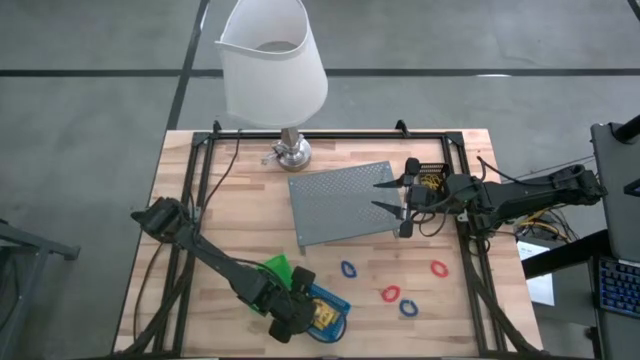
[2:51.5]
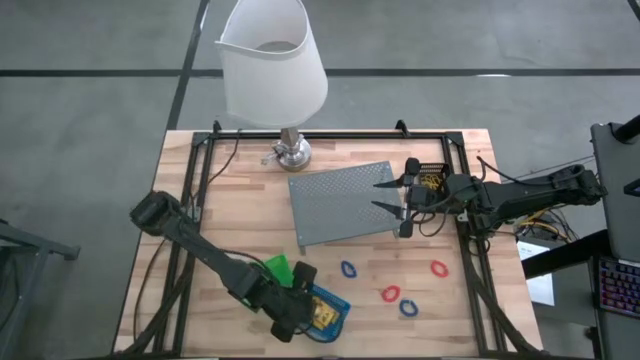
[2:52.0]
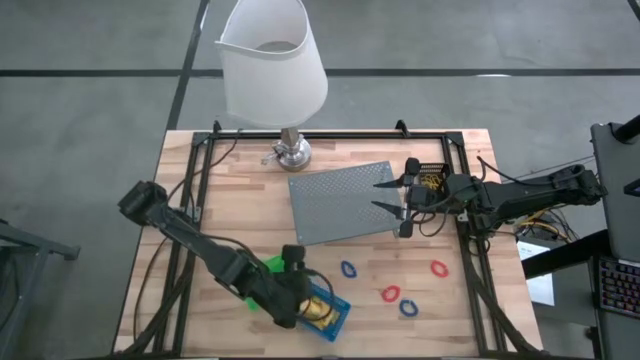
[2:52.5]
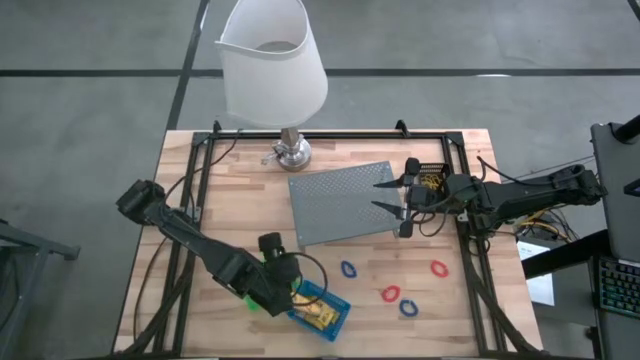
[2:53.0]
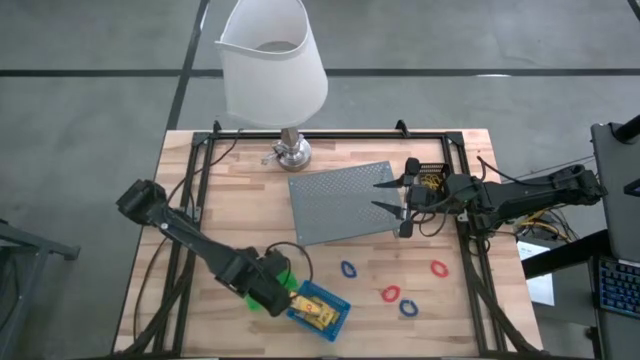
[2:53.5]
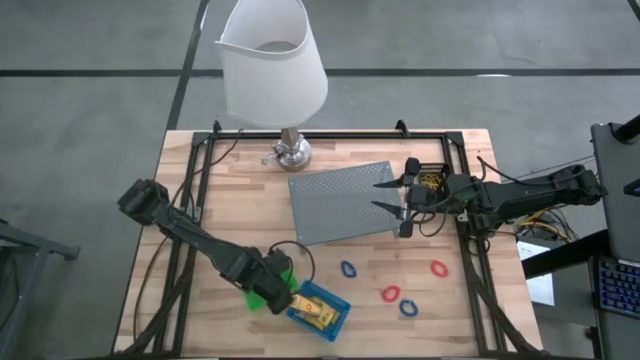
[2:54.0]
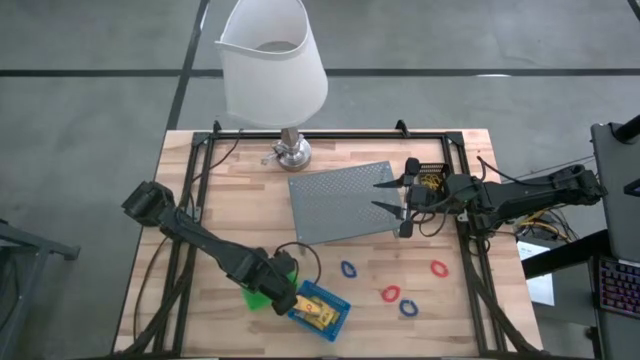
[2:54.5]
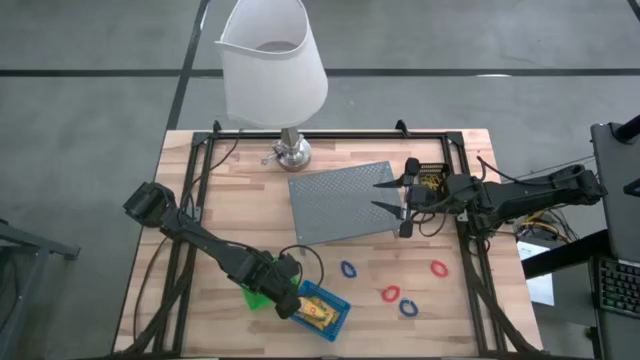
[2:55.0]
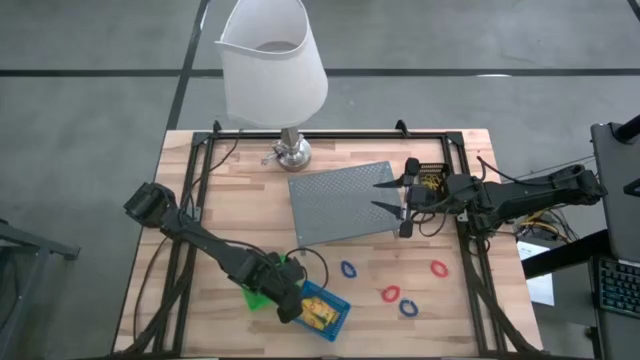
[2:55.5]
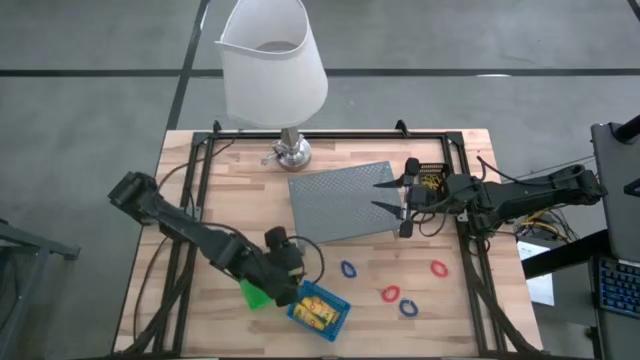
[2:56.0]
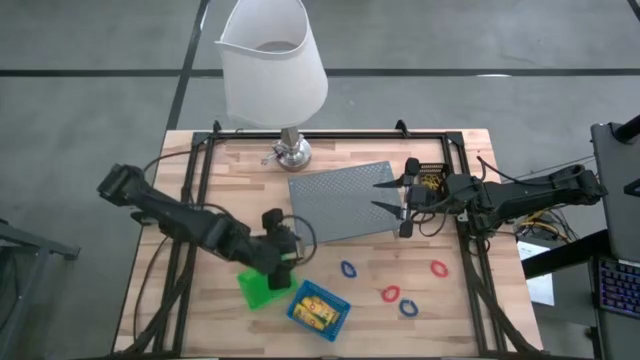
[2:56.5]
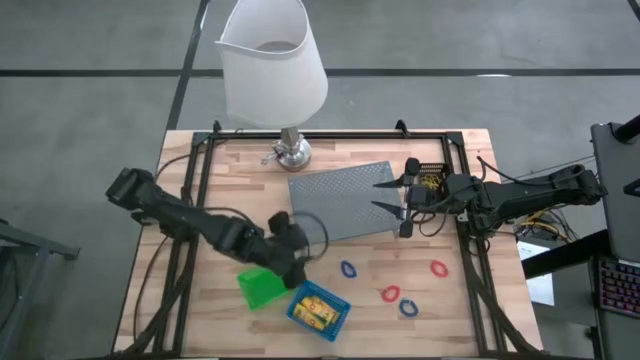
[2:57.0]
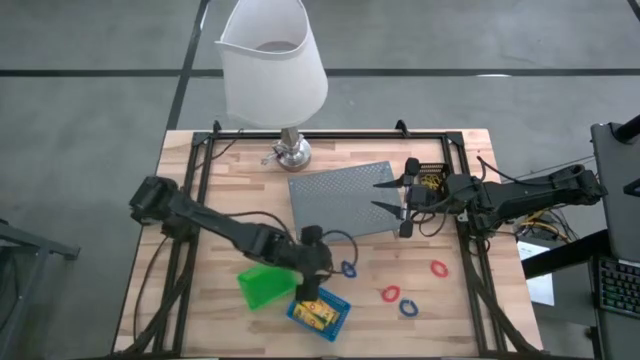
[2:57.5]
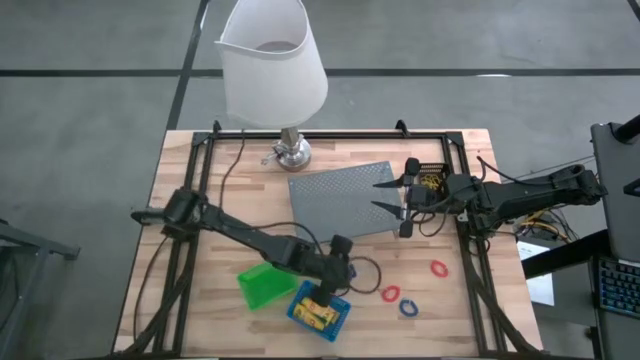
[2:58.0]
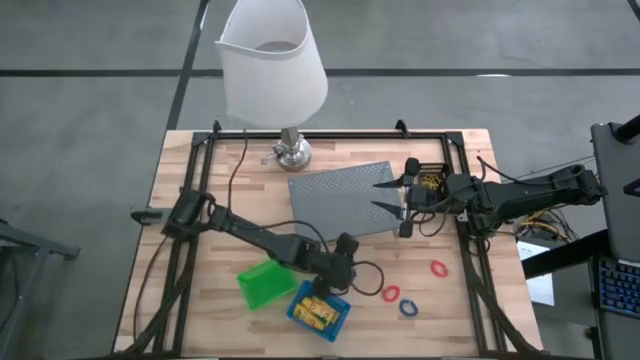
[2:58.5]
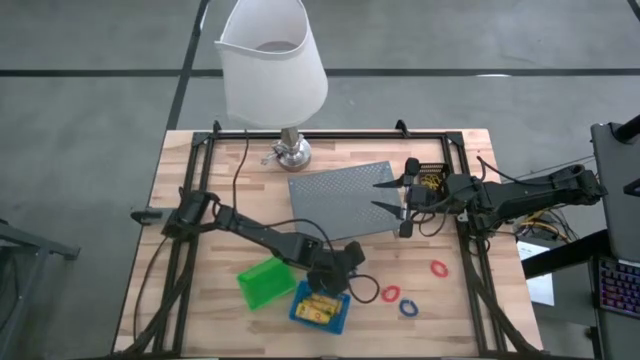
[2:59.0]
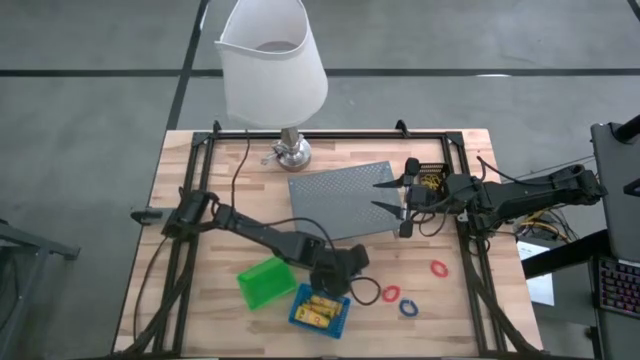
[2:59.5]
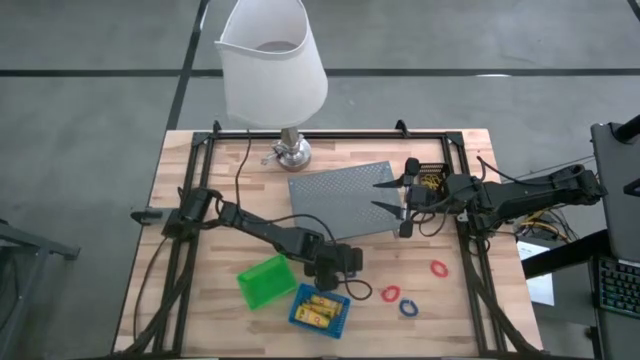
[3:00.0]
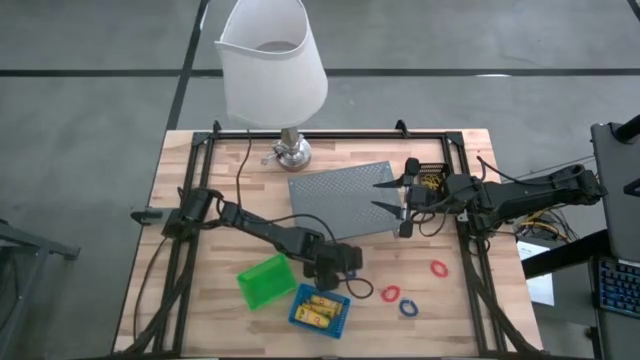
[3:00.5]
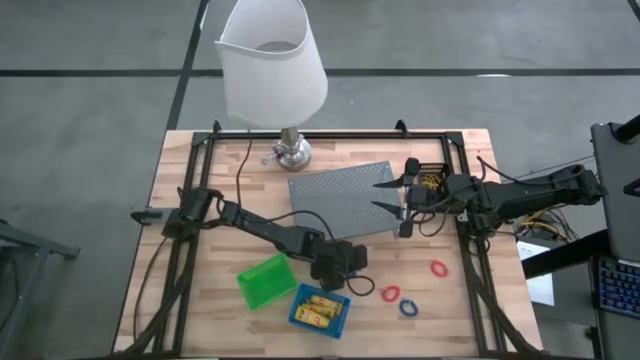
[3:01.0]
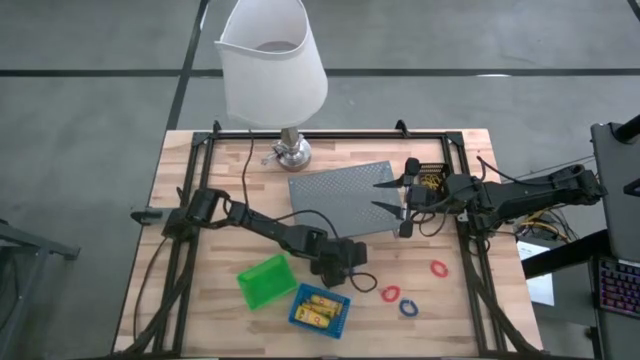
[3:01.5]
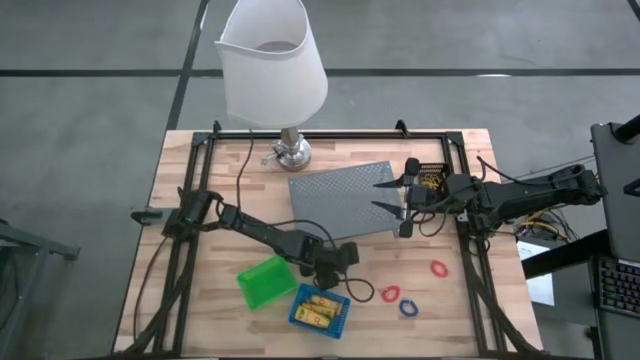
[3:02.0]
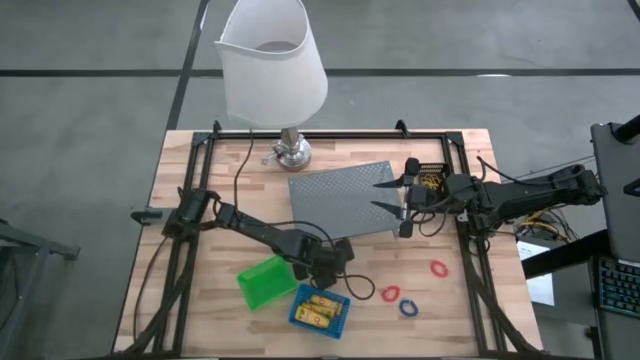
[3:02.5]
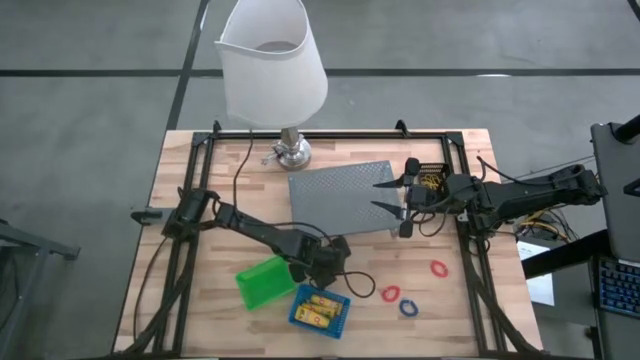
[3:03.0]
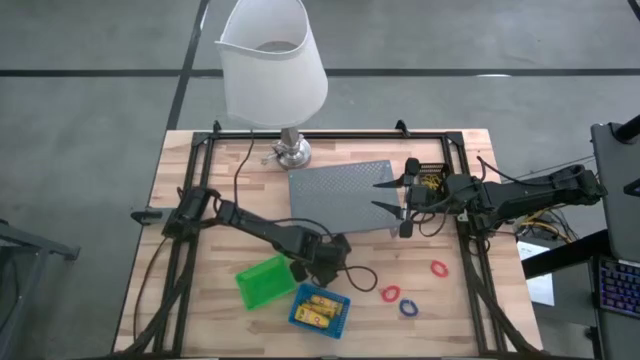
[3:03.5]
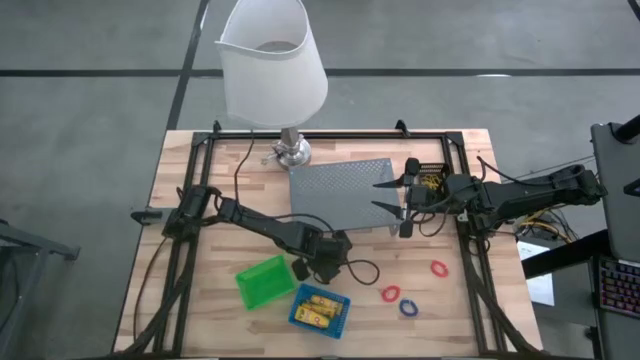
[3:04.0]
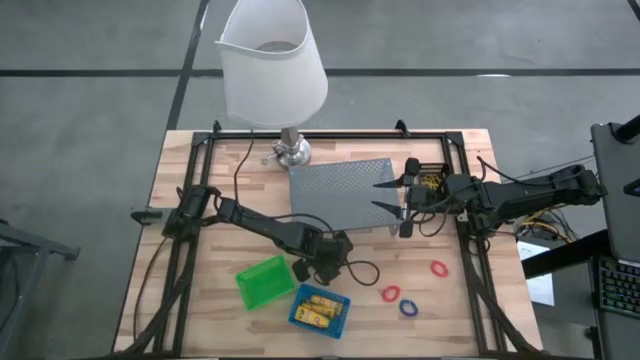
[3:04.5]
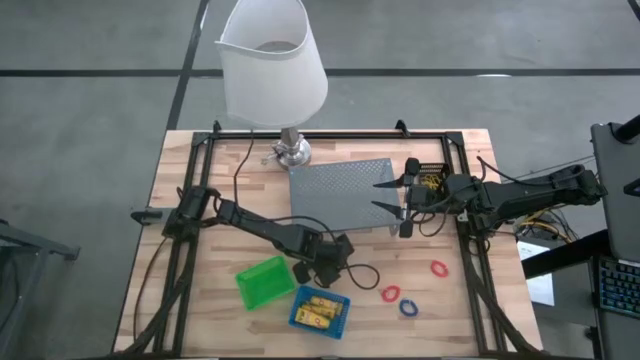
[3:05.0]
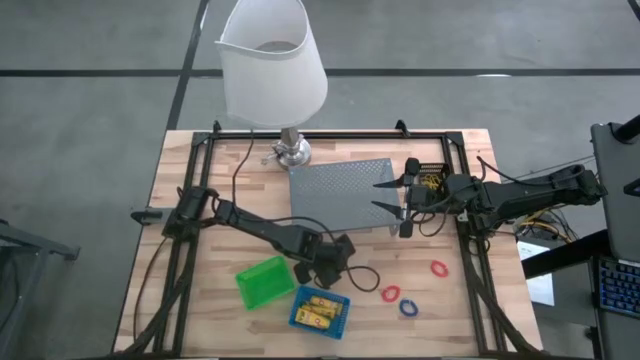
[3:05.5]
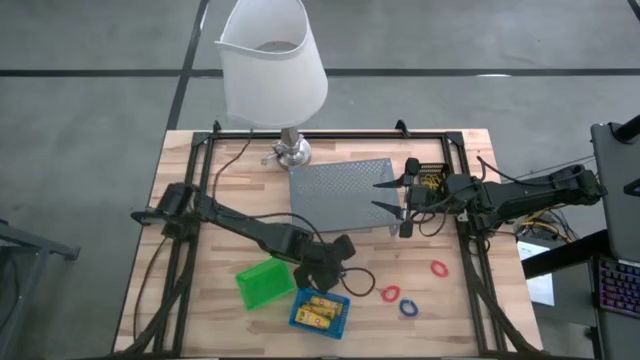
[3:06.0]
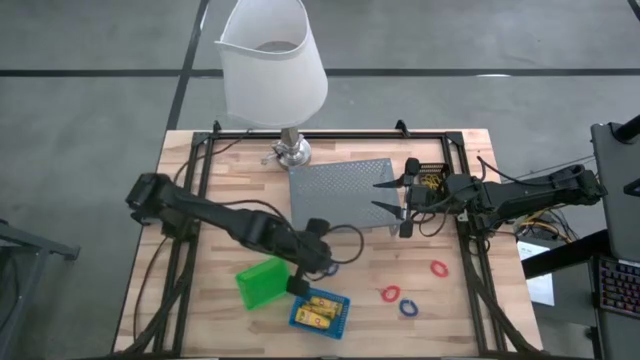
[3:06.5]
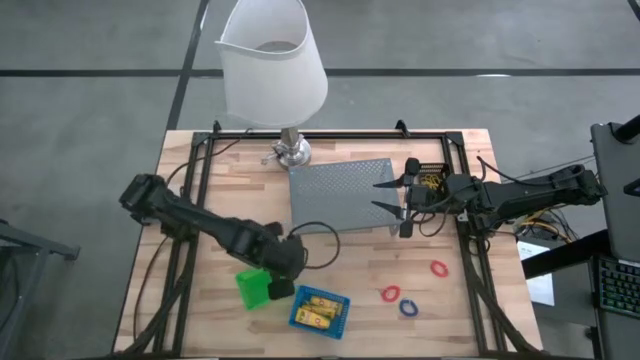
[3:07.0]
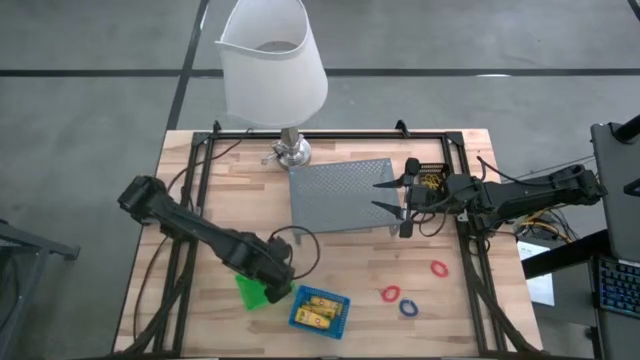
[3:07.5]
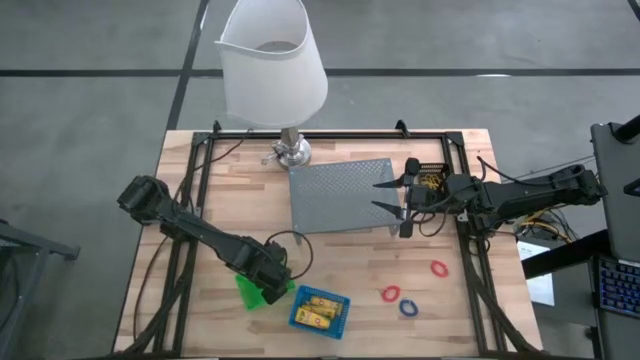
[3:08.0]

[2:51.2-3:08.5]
Task: Pick & Place Office Desk Supplies
Put the left blue spring rubber band into the green basket

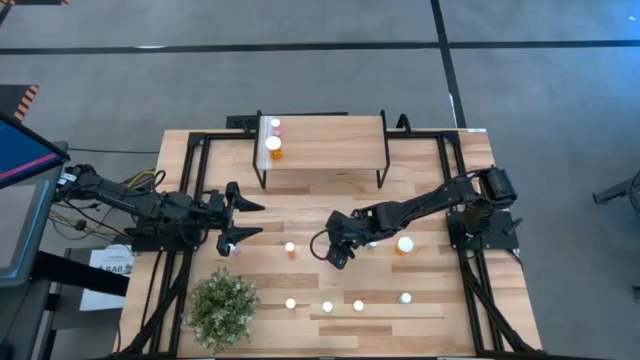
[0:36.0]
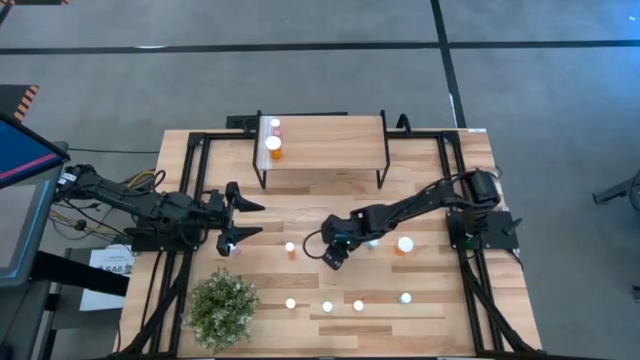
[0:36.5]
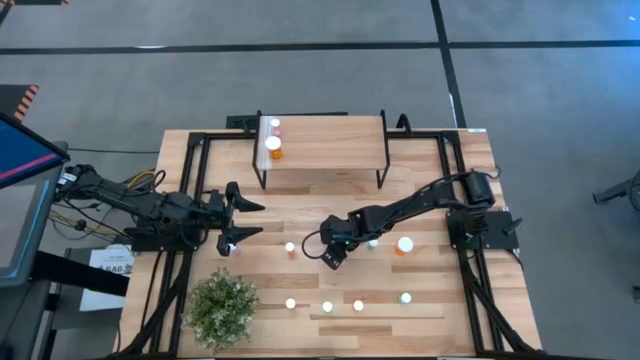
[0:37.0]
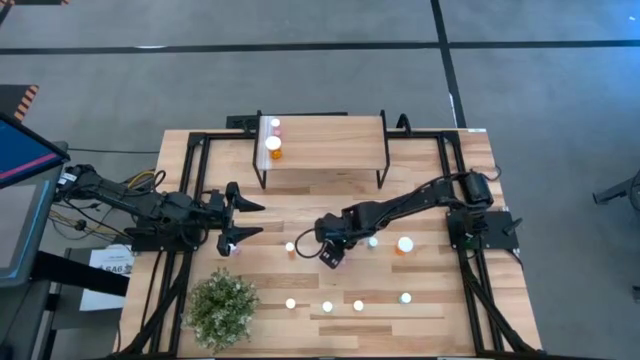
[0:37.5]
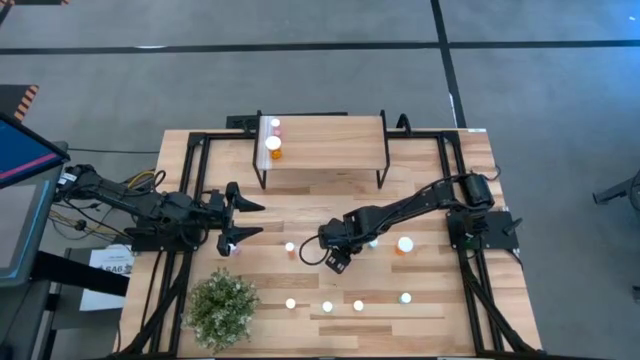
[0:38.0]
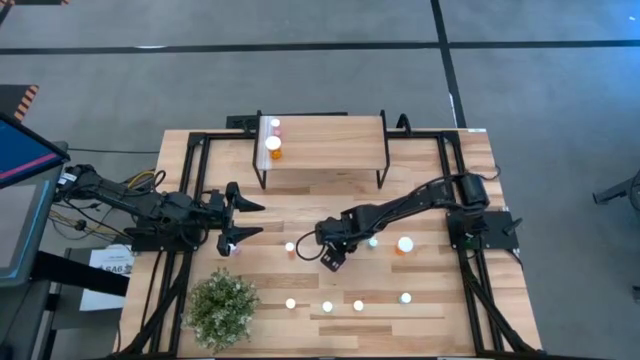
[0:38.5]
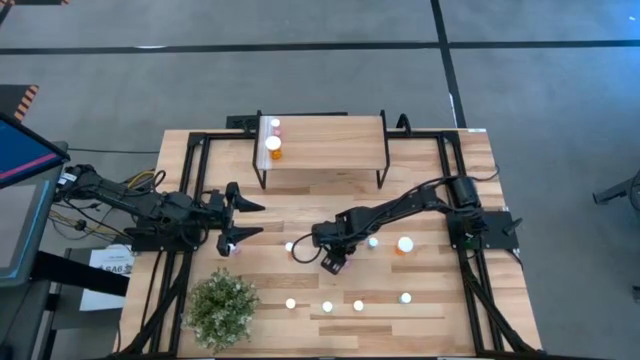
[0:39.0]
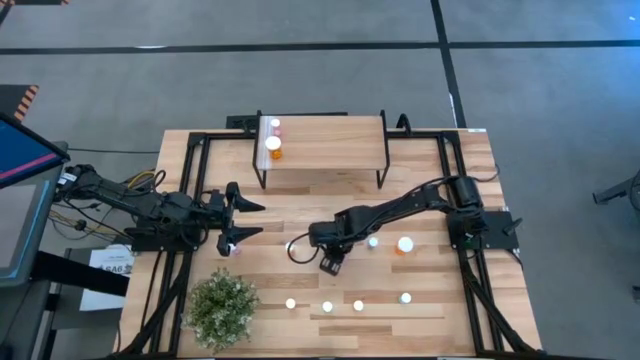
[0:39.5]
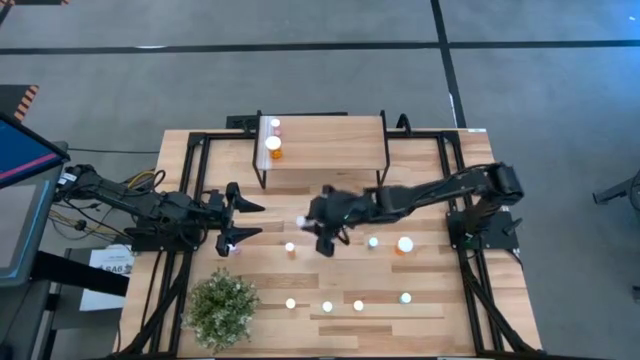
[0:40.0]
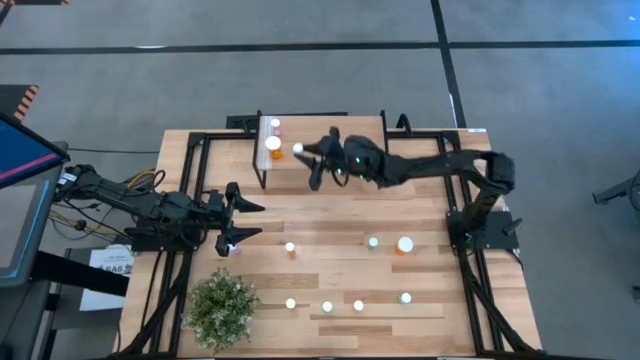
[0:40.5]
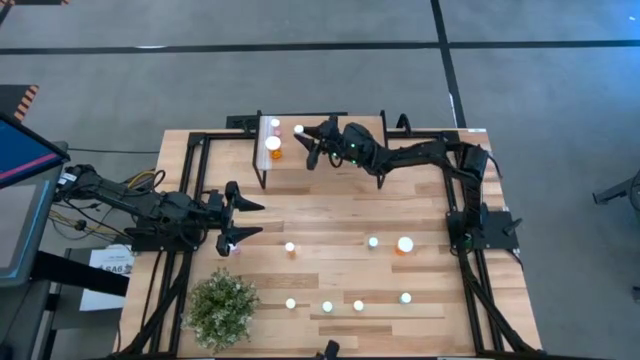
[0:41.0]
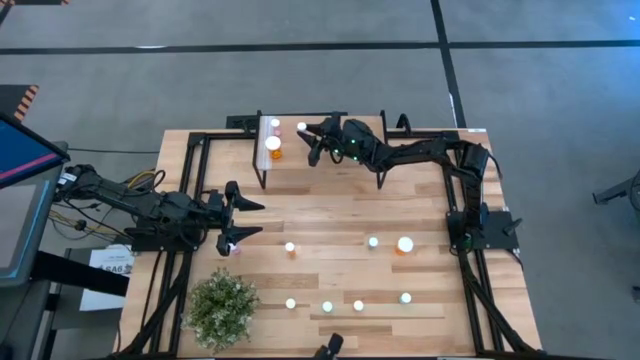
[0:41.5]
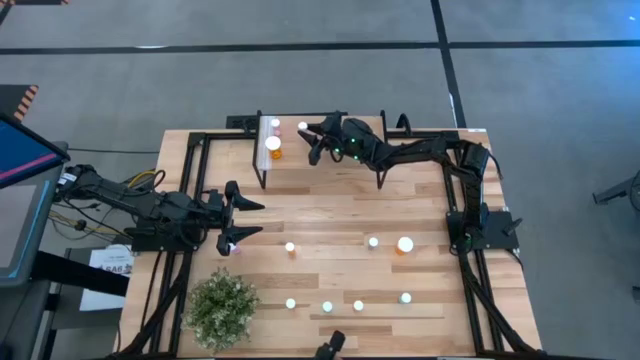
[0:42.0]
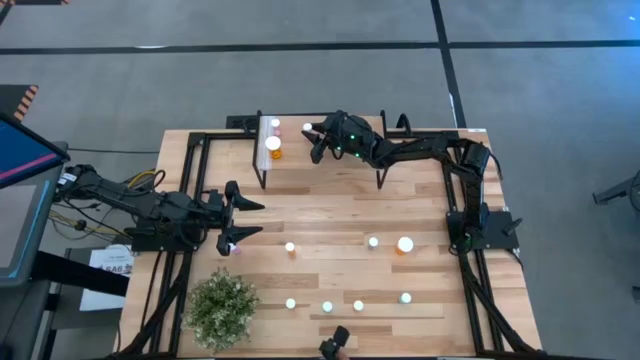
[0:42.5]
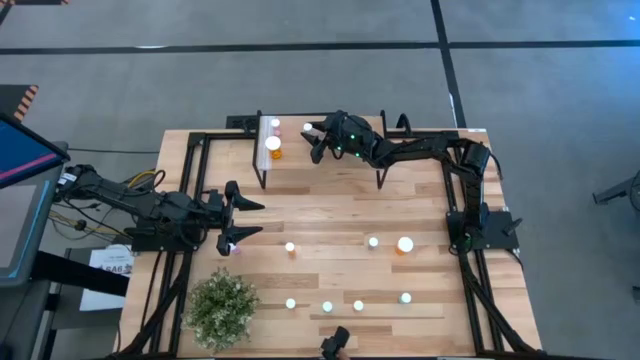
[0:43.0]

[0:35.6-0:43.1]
Task: Pick and place medicine bottles onto shelf by color
Put the small transparent pill bottle on the shelf
